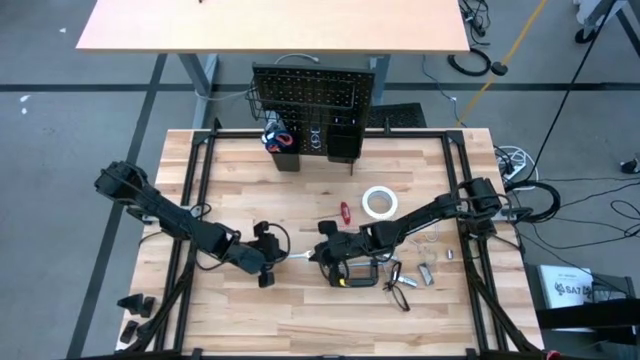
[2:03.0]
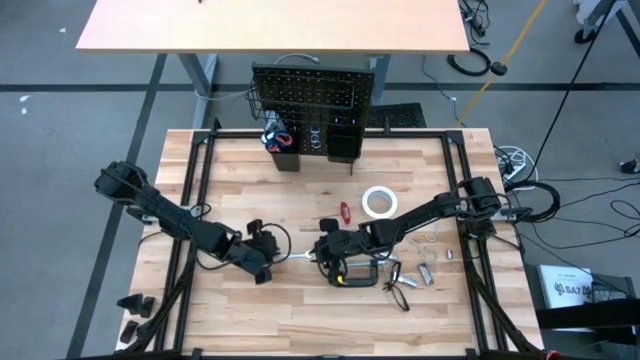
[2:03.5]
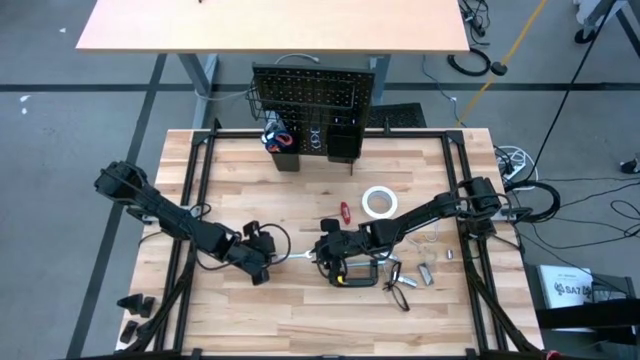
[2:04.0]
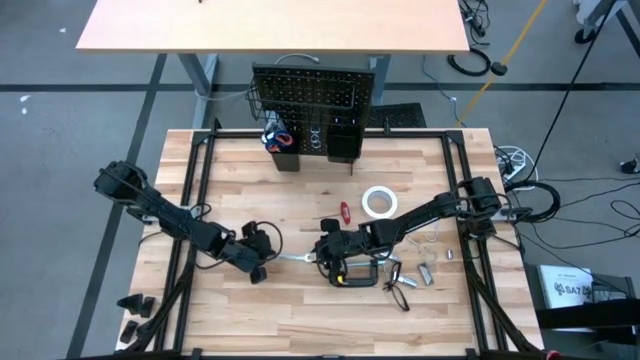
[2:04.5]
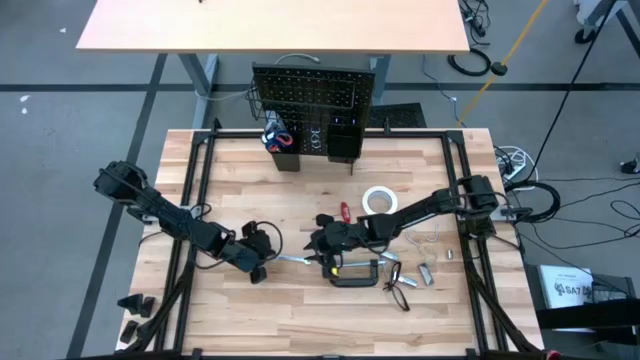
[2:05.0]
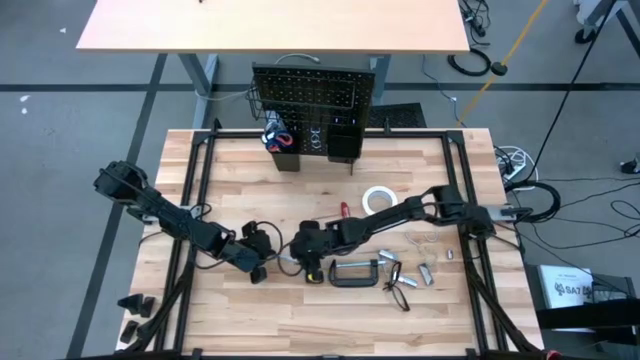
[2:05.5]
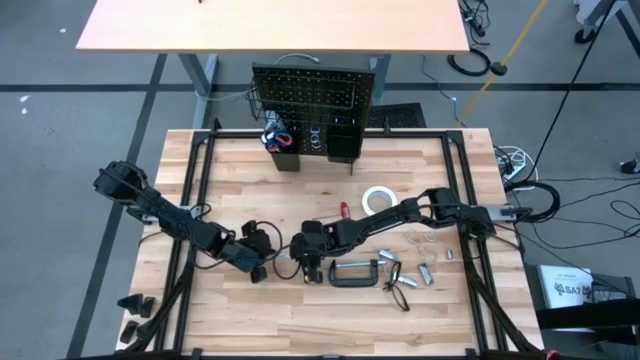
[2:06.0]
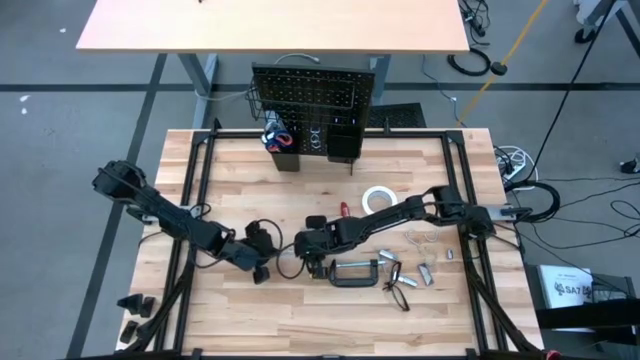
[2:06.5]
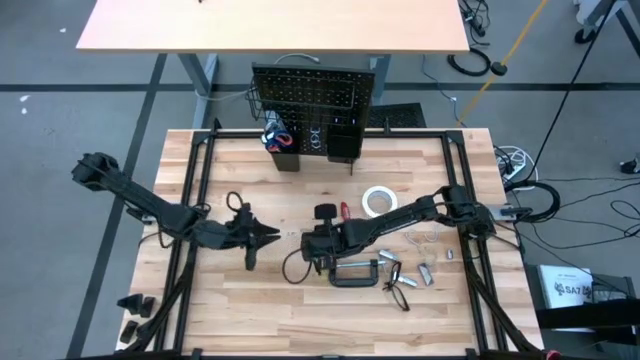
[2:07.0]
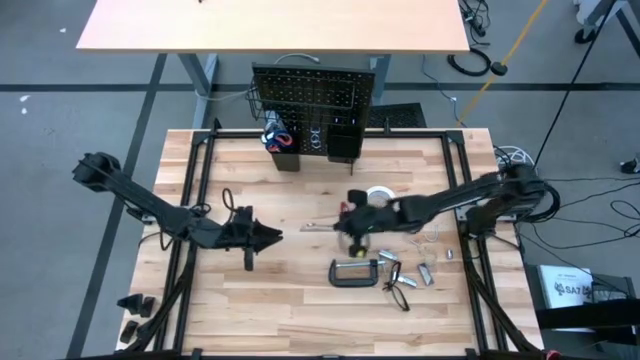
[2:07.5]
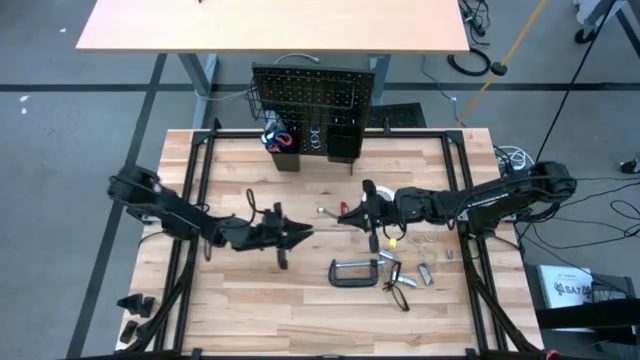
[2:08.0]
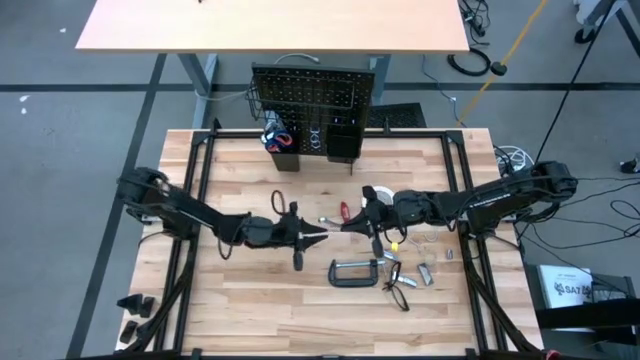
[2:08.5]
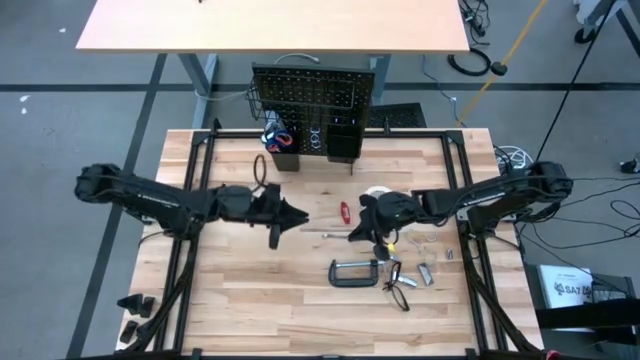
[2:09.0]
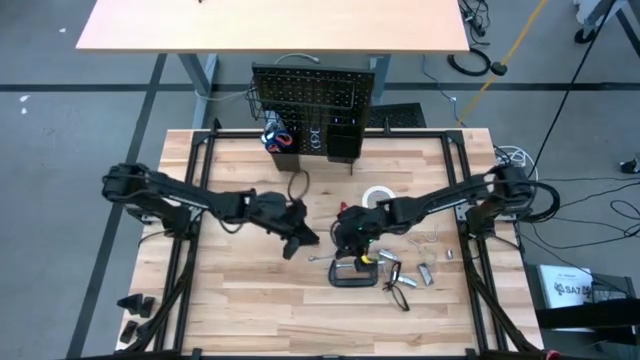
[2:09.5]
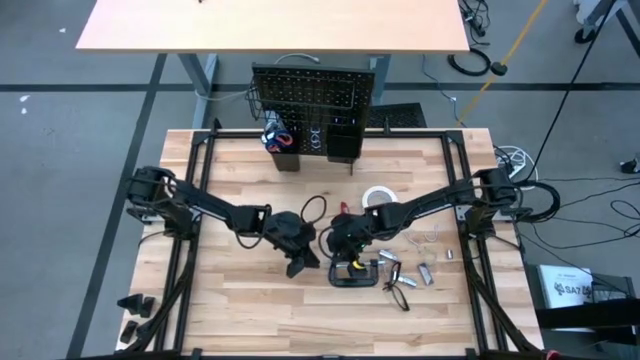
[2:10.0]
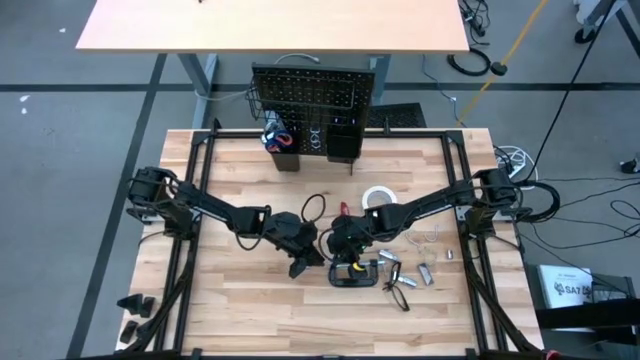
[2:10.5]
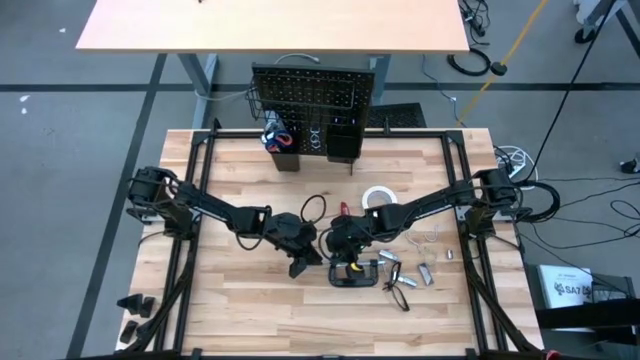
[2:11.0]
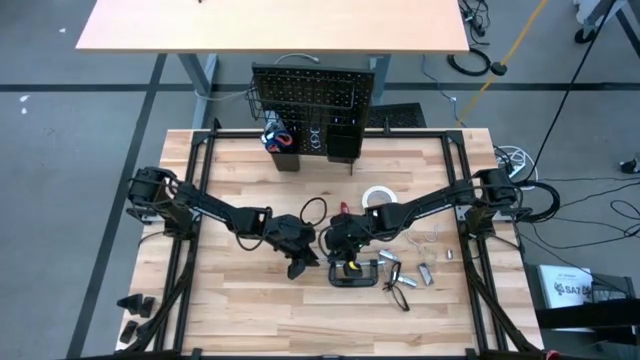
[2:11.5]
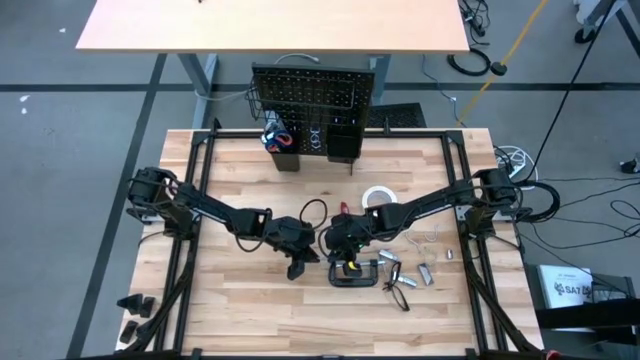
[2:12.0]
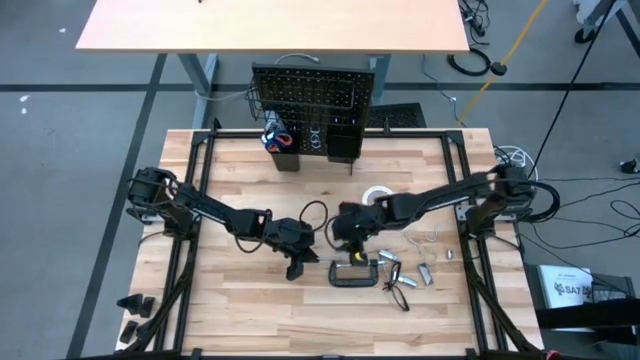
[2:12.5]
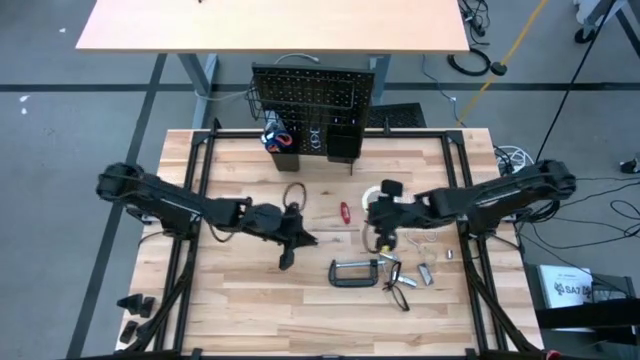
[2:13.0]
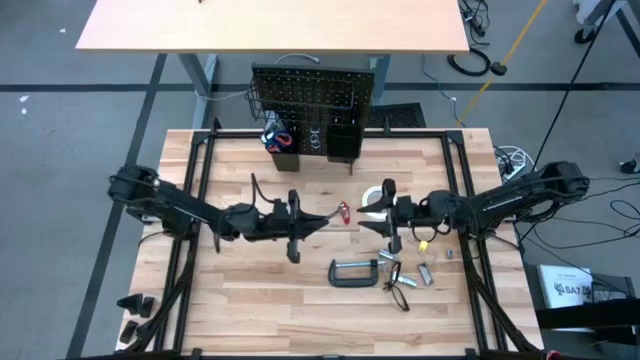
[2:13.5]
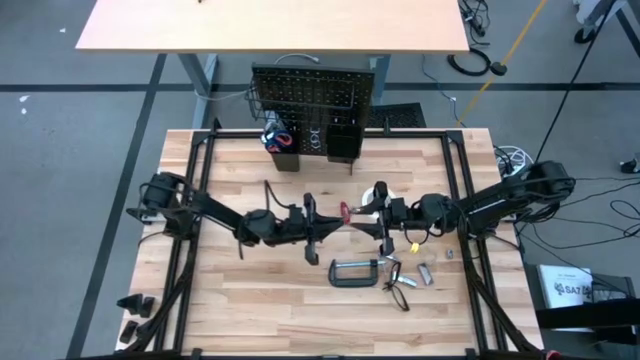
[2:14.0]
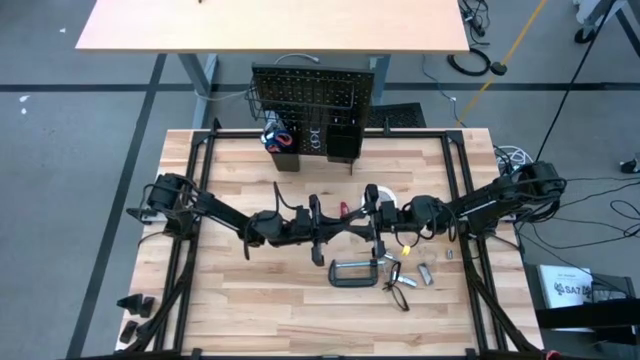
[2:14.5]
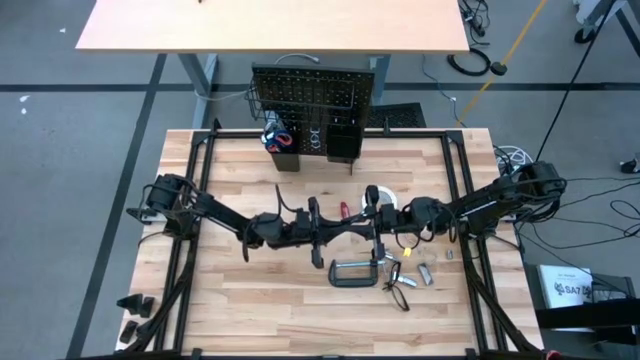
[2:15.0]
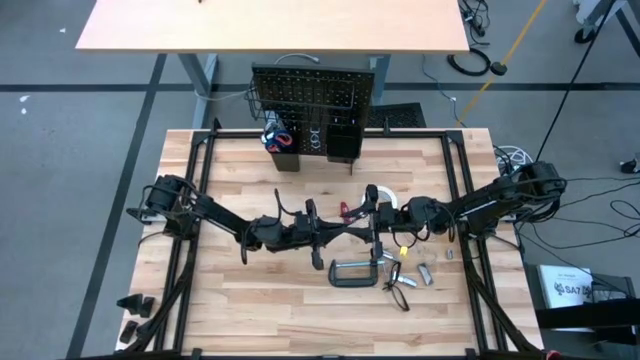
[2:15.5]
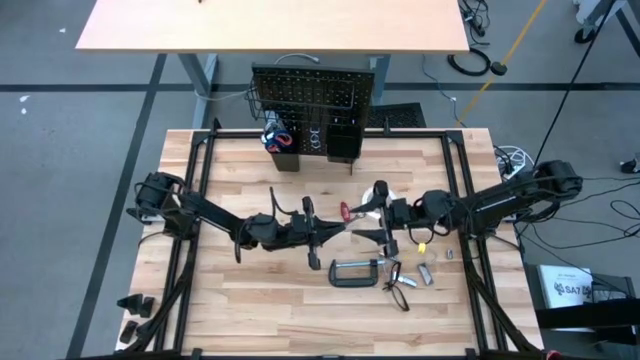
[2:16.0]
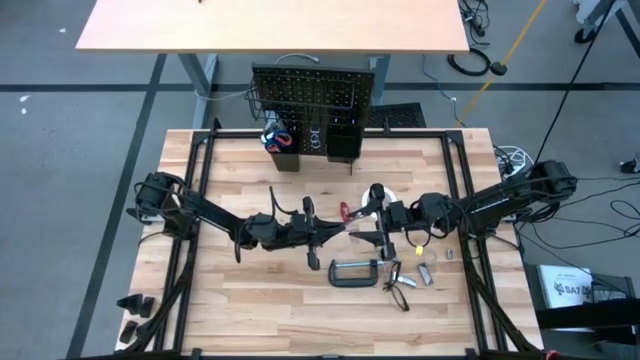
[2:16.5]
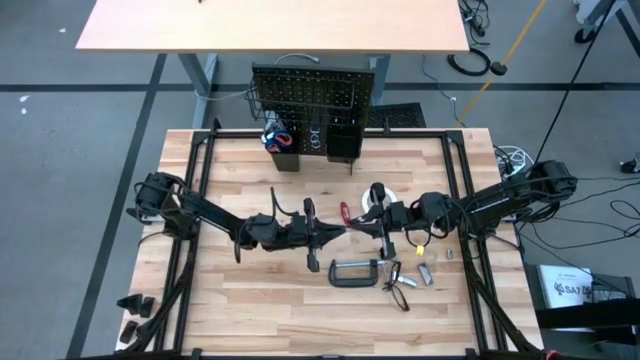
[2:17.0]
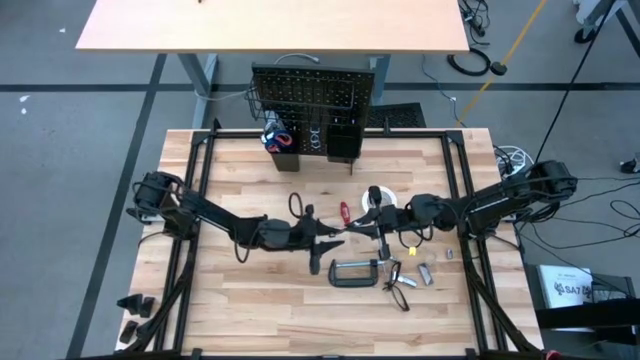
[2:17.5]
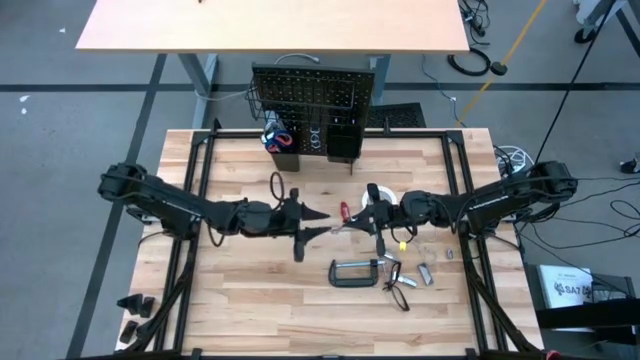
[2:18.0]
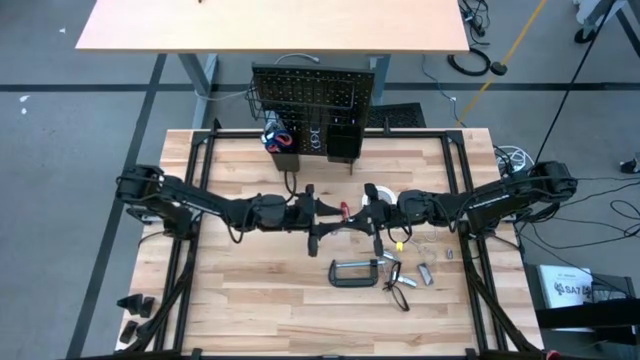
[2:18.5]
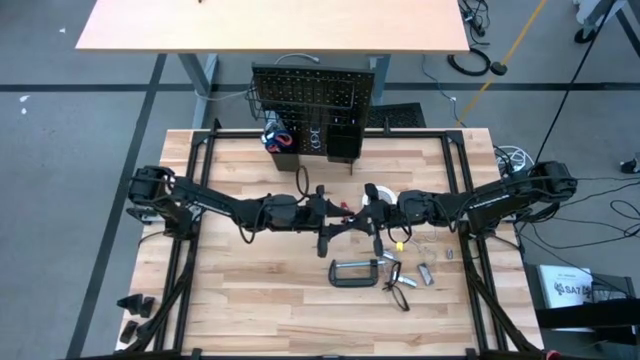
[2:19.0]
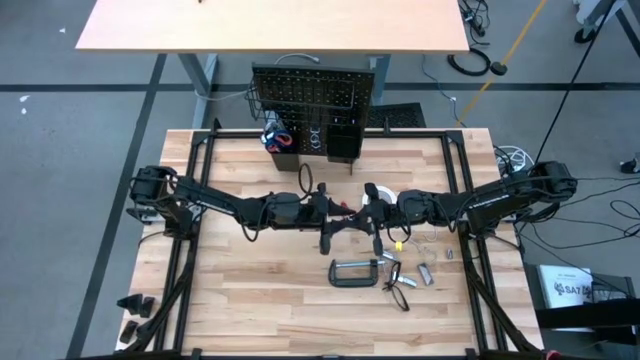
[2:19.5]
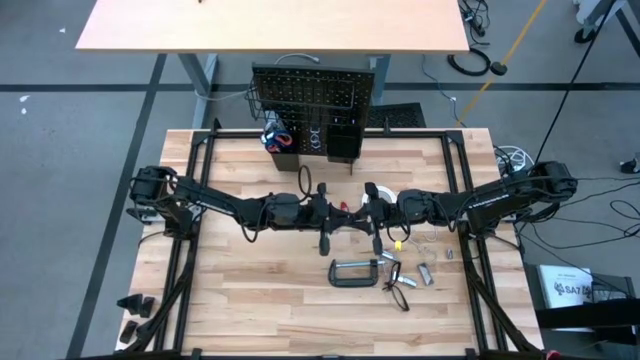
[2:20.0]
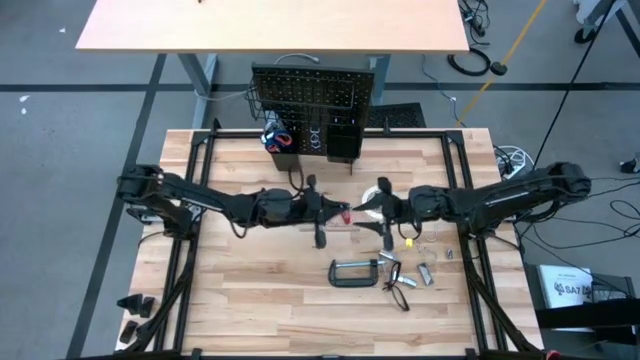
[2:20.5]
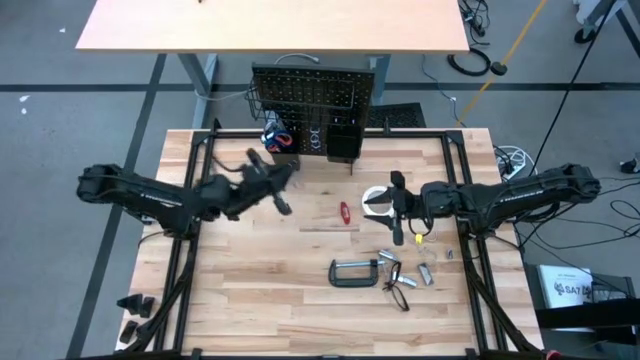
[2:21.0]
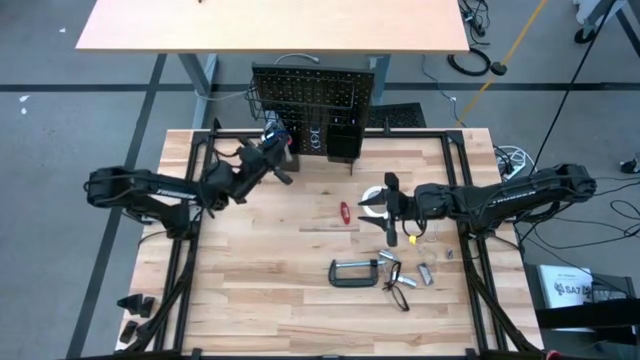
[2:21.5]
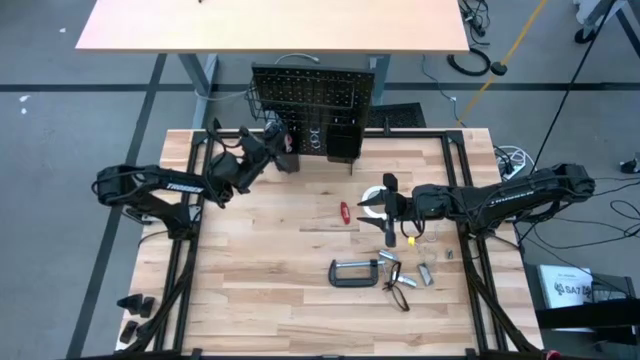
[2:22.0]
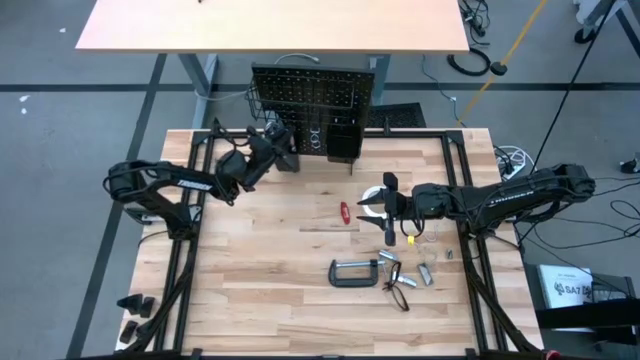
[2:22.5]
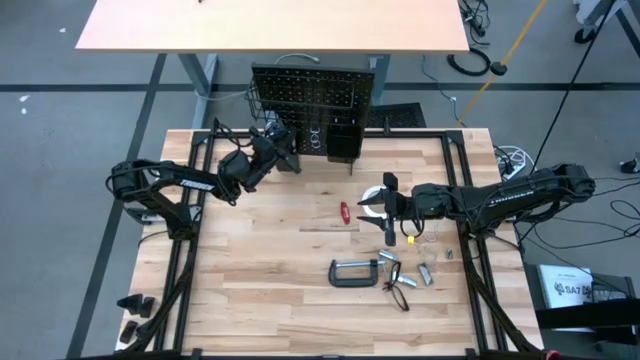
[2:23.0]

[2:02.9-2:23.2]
Task: Hang tools onto peg board
Put the combination wrench on the left lower deck of the pegboard
